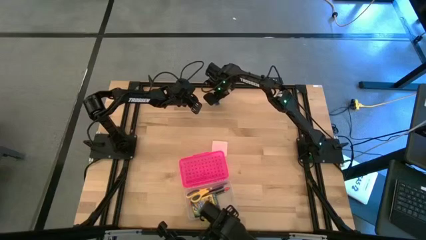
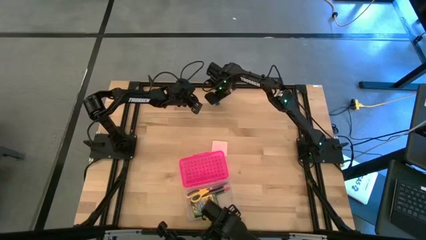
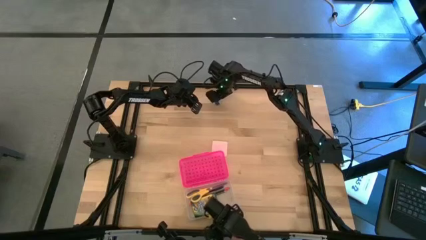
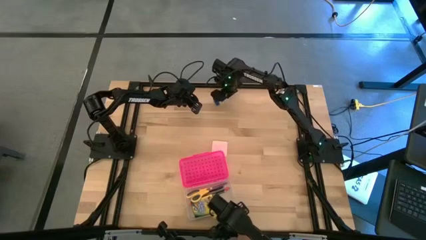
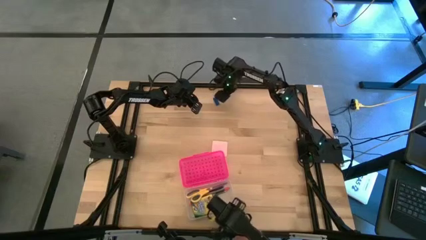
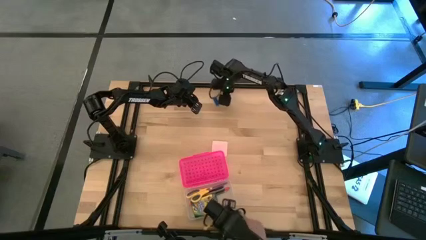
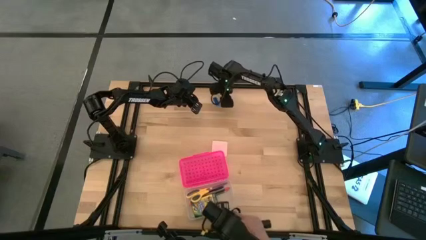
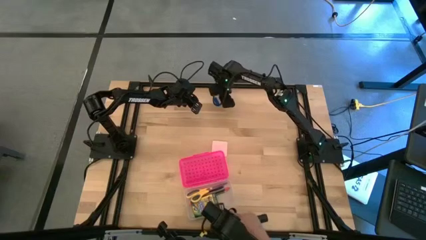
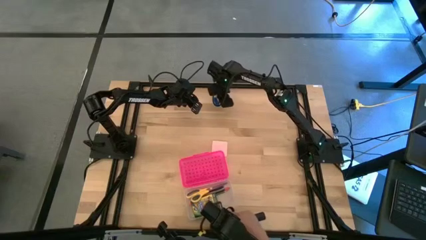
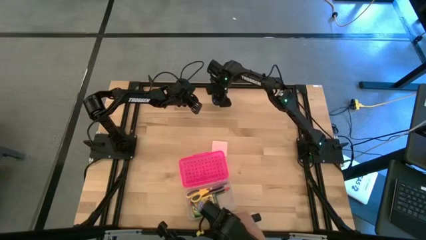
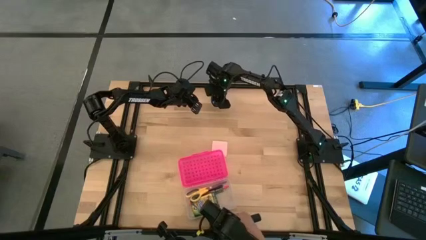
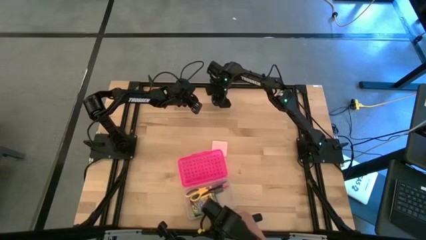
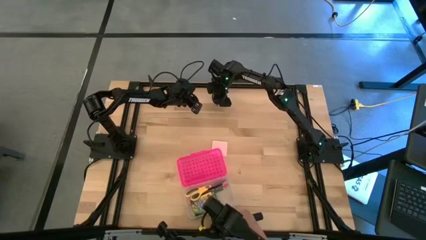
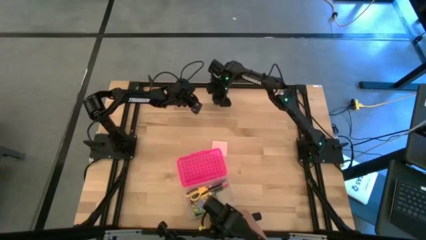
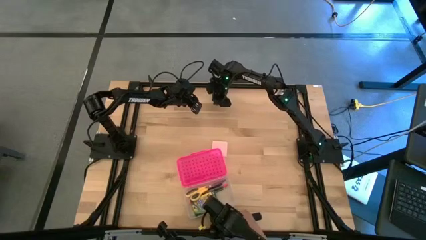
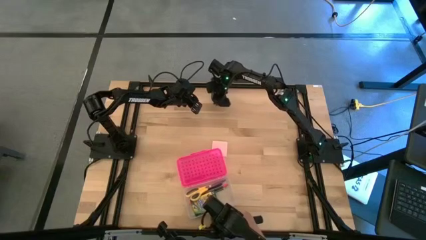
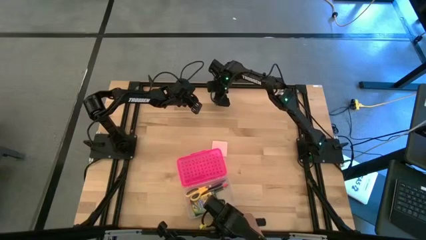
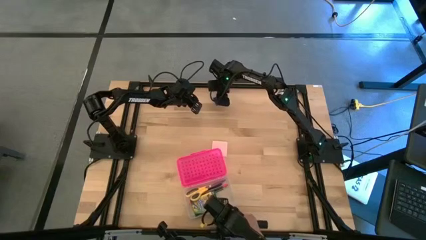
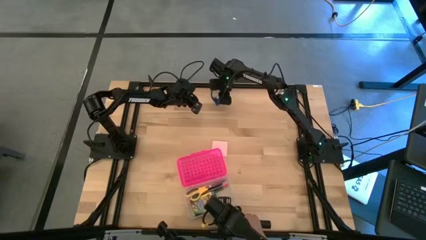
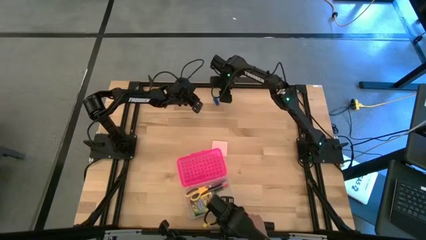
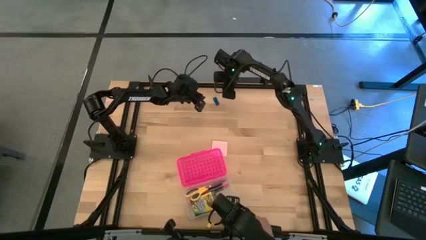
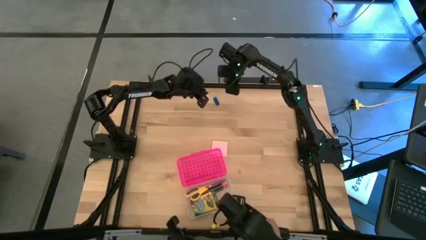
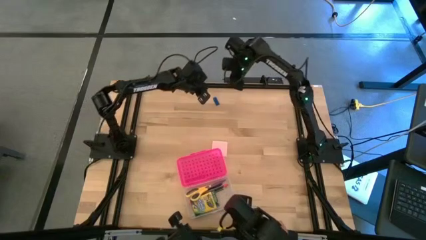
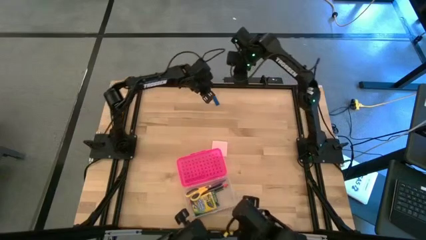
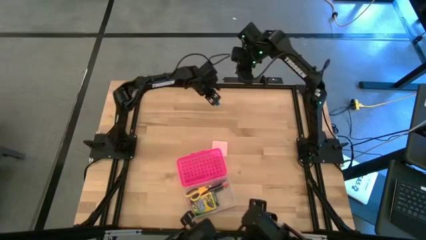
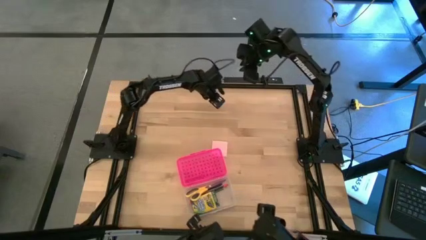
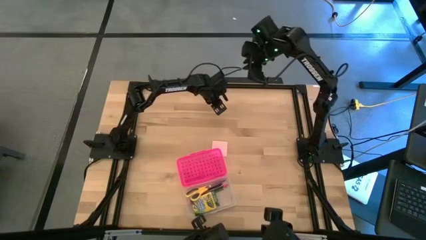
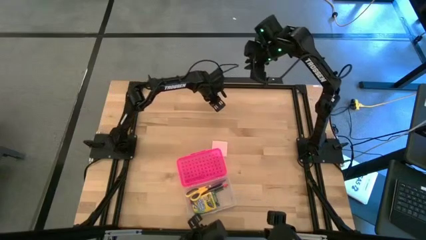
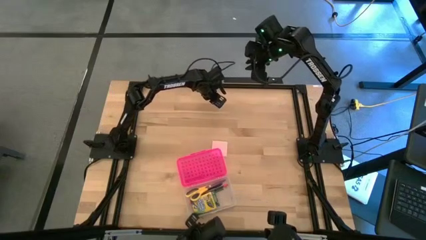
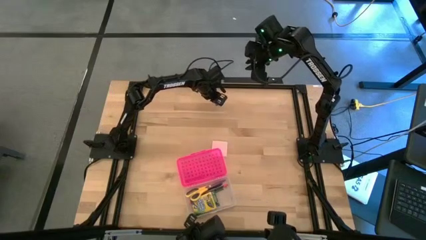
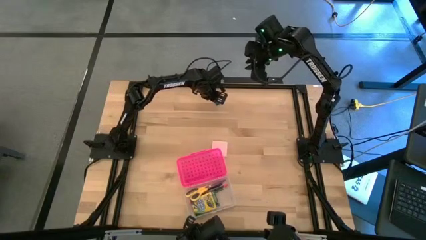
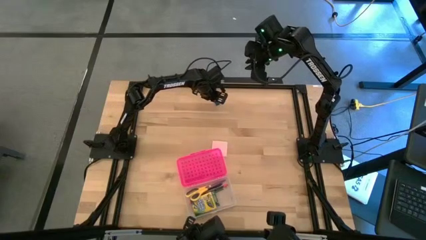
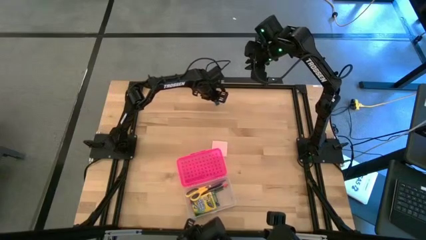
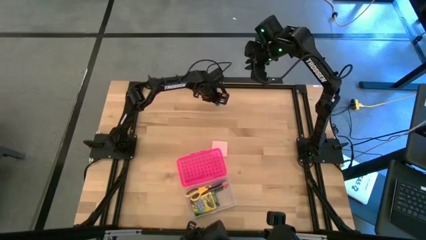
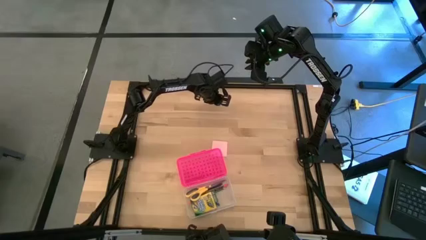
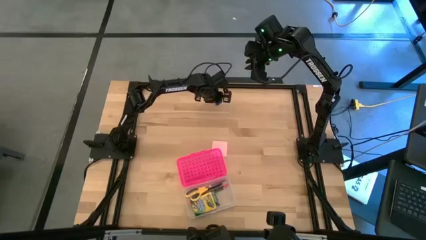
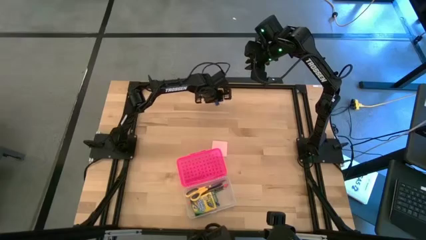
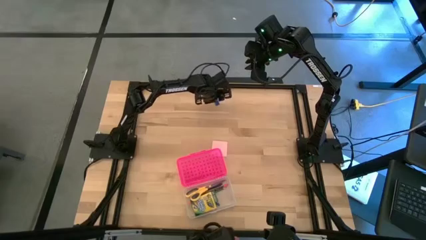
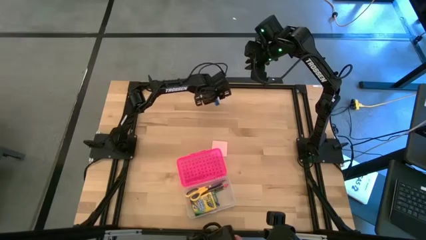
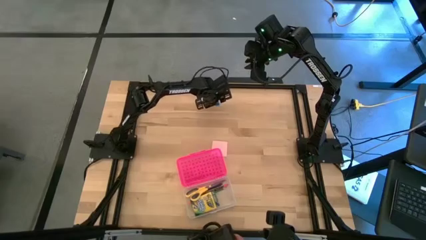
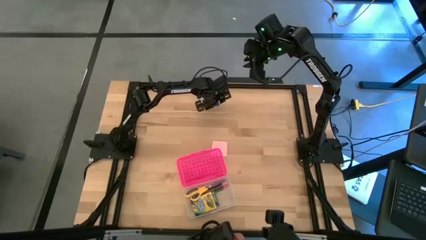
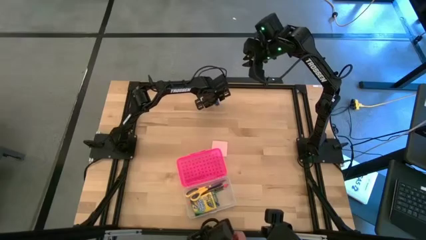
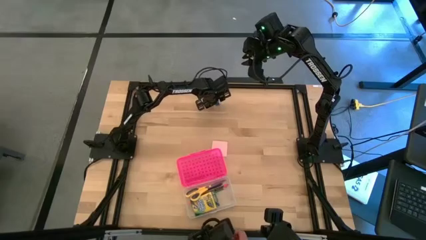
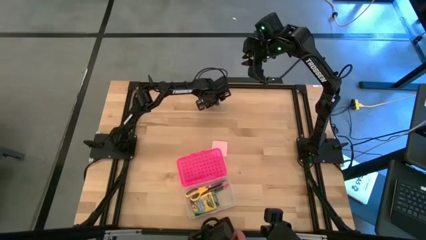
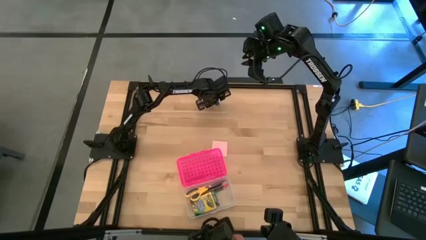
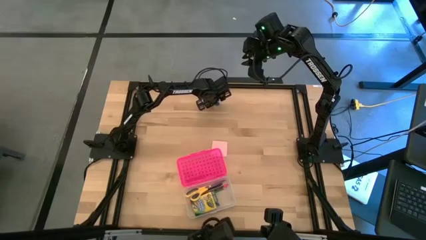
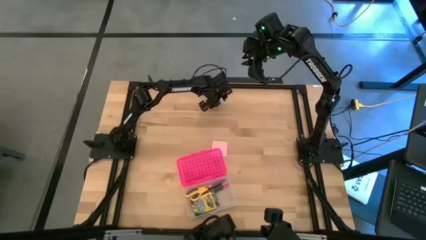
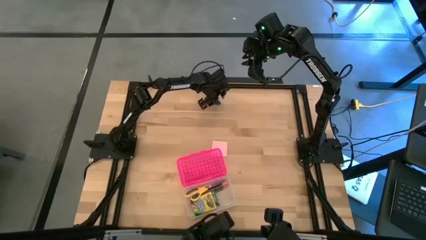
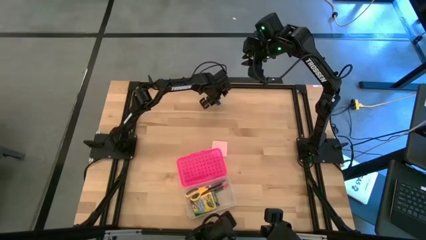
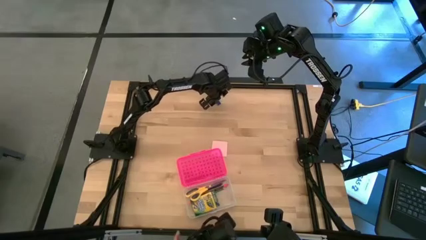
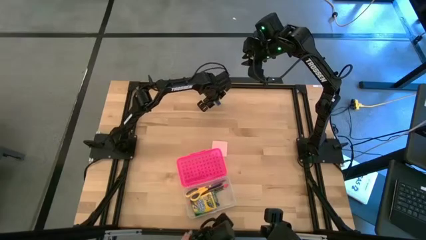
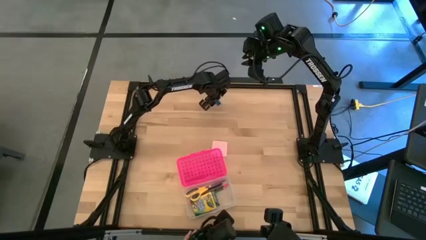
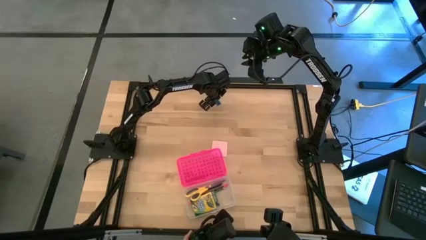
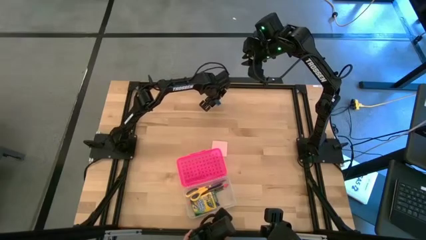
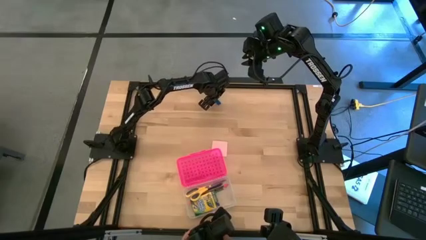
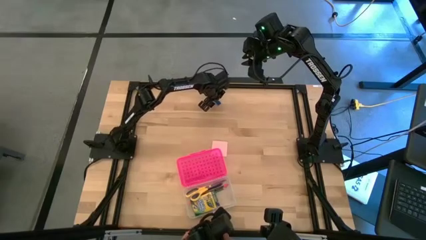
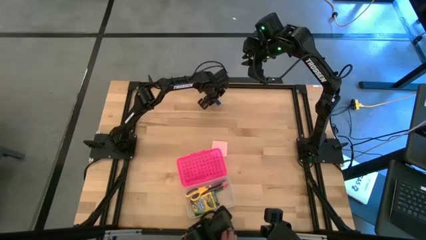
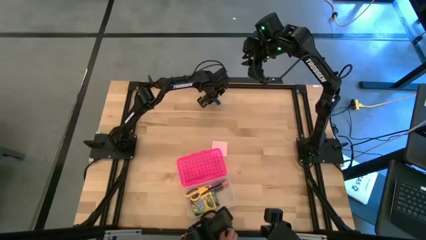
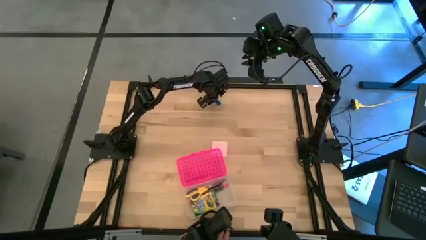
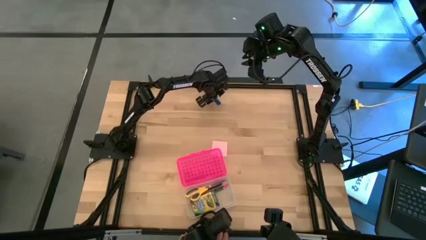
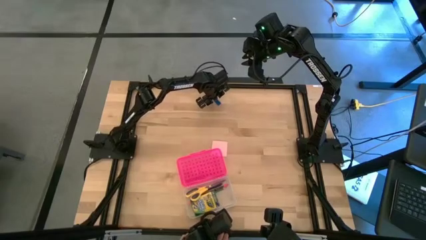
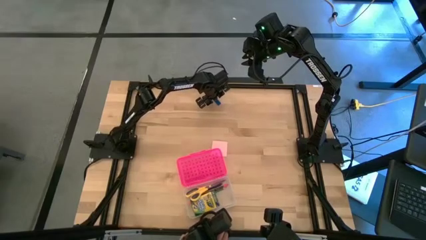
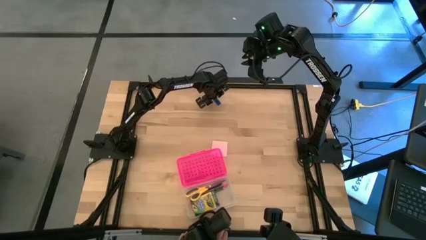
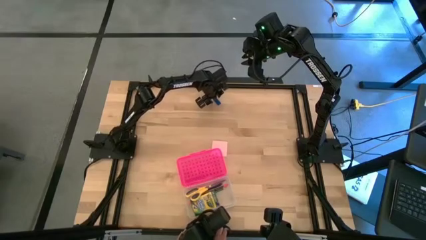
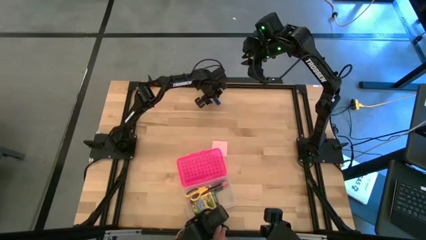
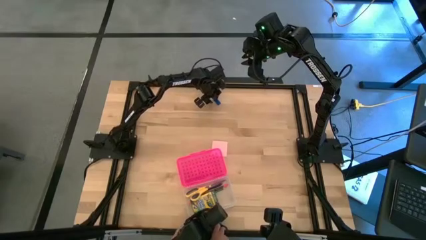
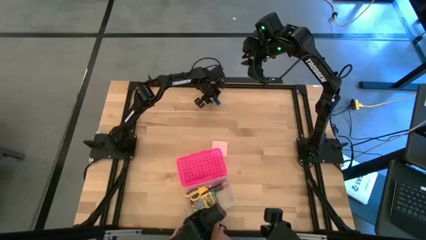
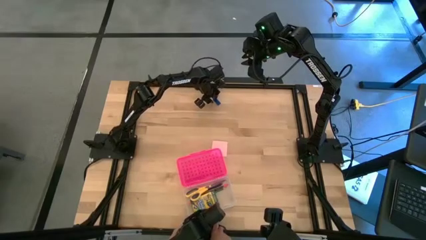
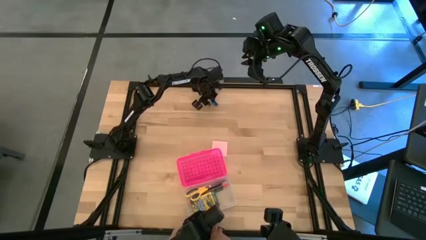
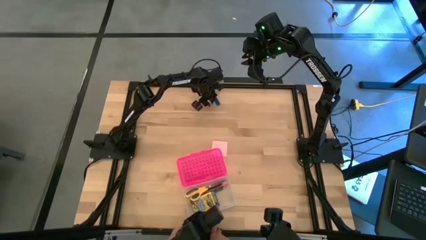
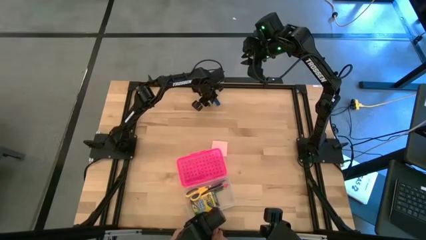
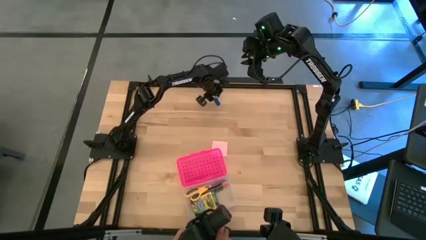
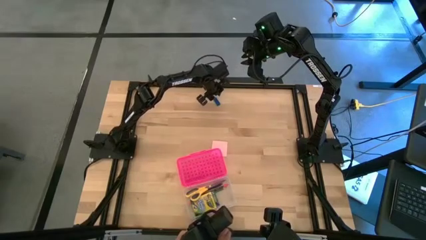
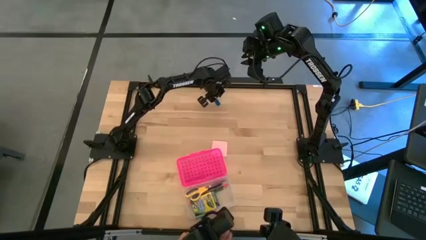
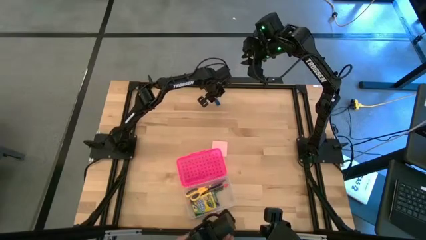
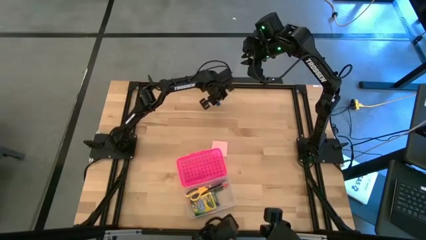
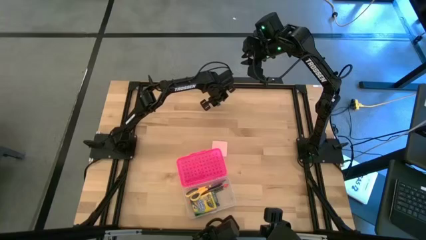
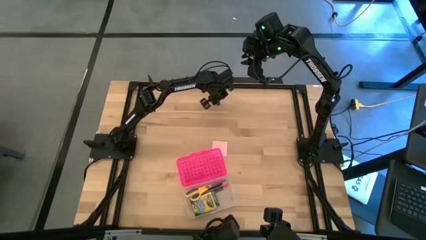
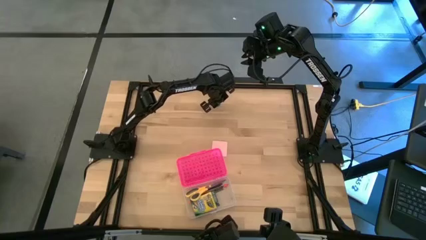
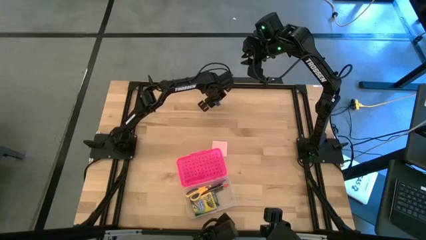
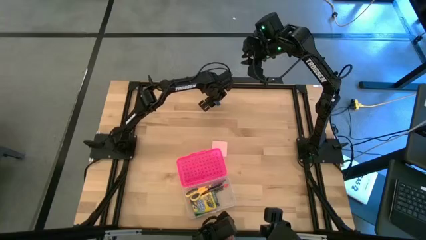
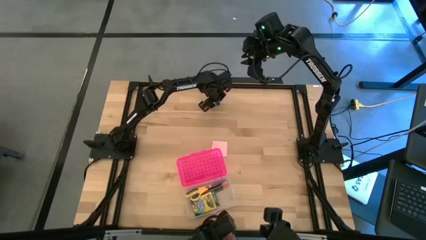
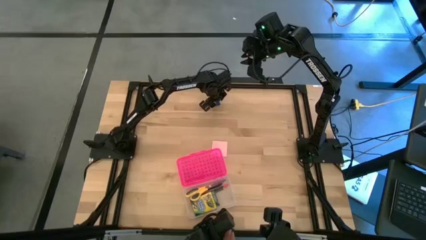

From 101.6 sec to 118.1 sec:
Task: Pack school essentials
Put the blue eraser into the pink supply box
